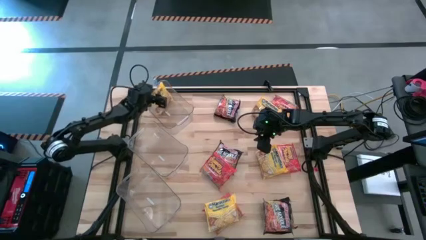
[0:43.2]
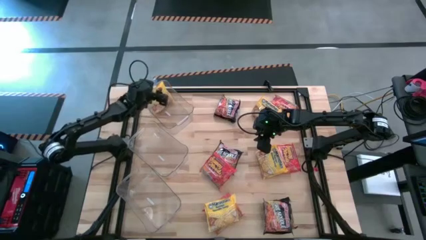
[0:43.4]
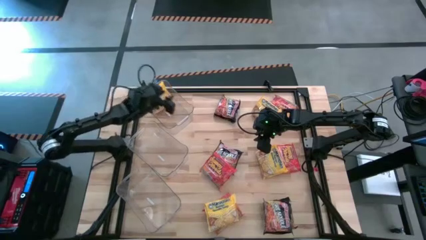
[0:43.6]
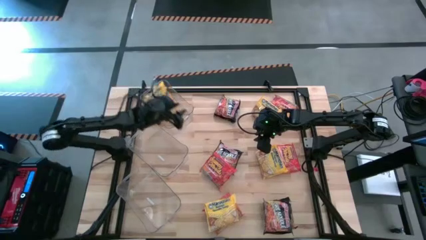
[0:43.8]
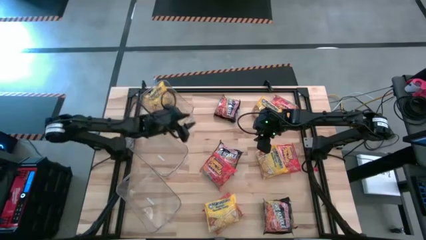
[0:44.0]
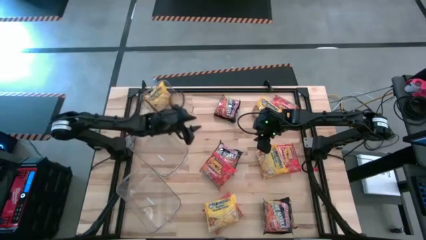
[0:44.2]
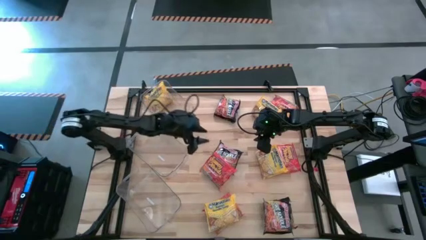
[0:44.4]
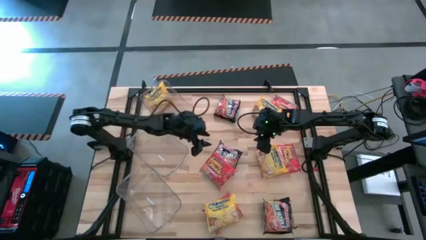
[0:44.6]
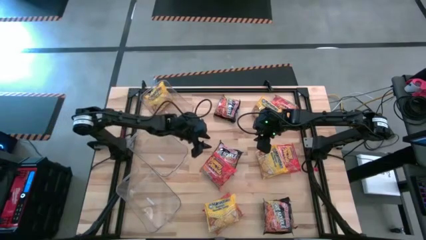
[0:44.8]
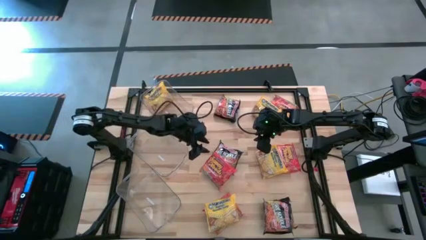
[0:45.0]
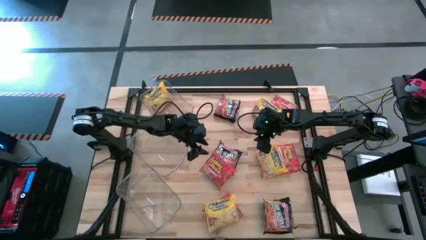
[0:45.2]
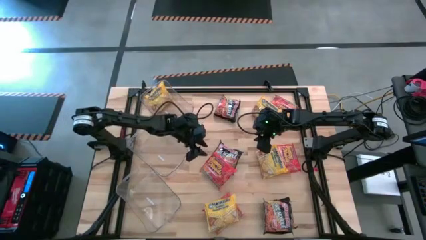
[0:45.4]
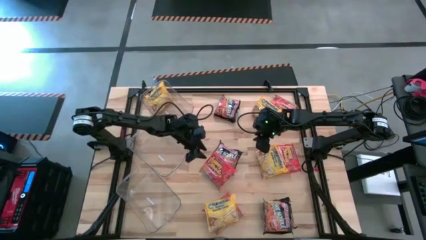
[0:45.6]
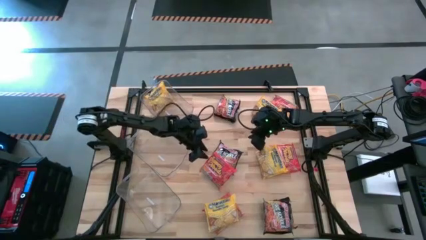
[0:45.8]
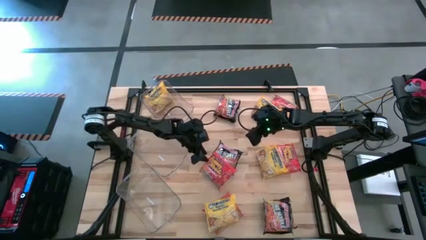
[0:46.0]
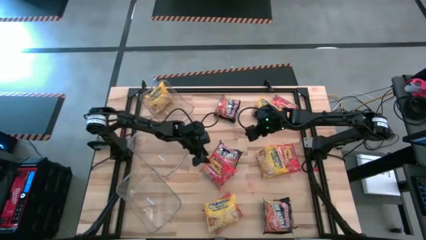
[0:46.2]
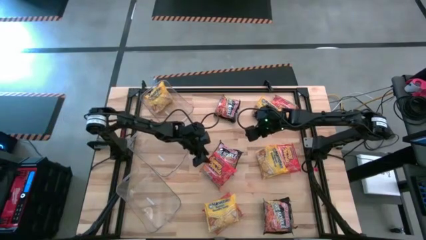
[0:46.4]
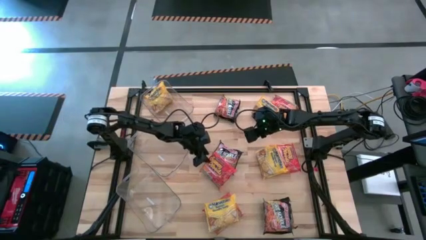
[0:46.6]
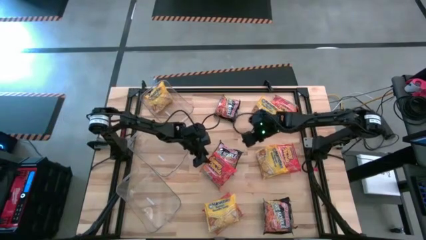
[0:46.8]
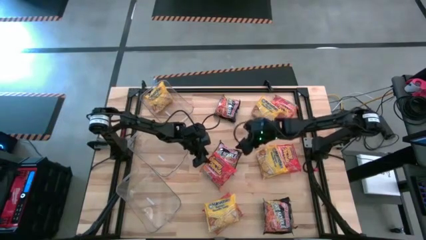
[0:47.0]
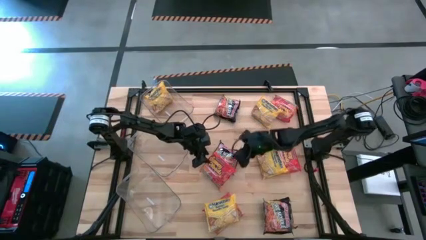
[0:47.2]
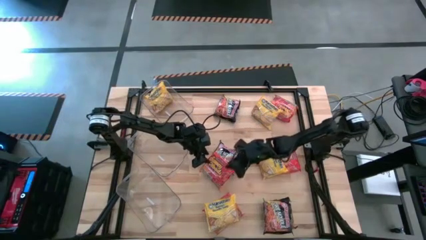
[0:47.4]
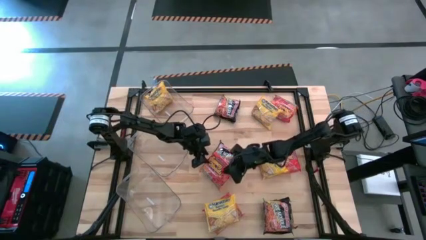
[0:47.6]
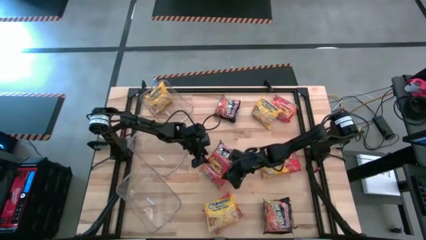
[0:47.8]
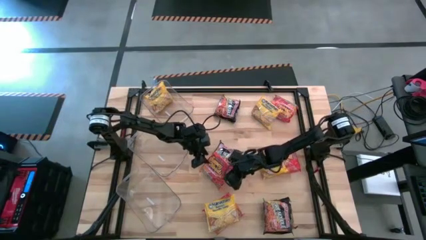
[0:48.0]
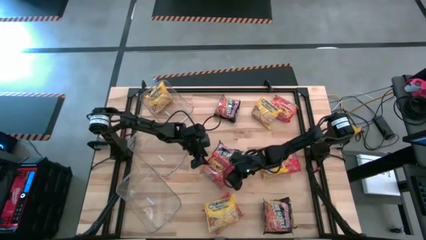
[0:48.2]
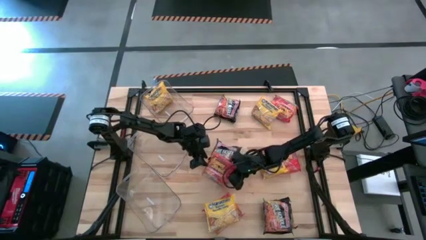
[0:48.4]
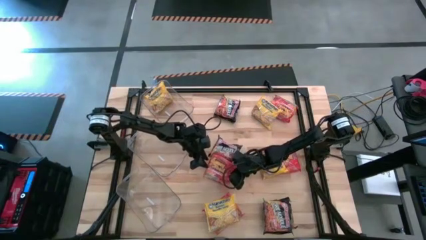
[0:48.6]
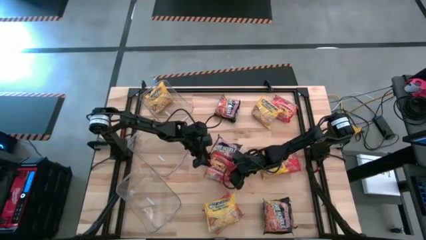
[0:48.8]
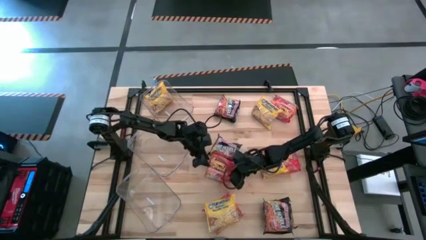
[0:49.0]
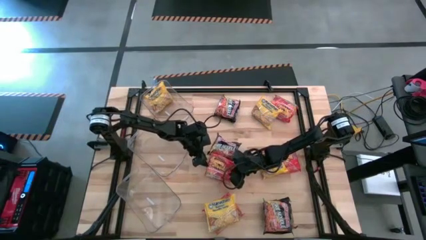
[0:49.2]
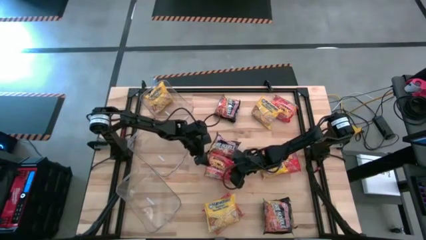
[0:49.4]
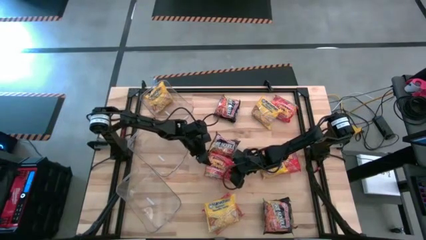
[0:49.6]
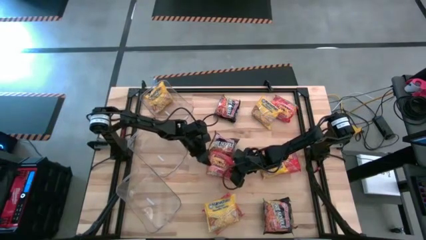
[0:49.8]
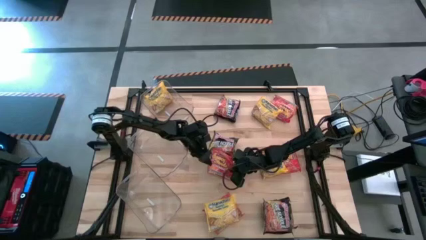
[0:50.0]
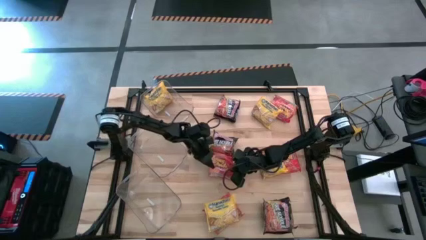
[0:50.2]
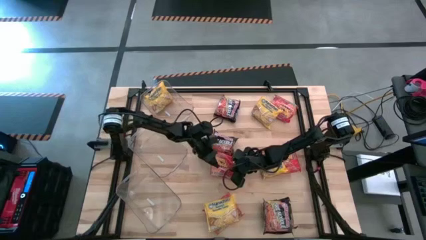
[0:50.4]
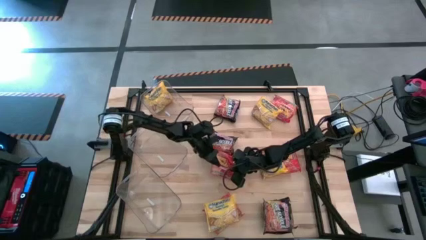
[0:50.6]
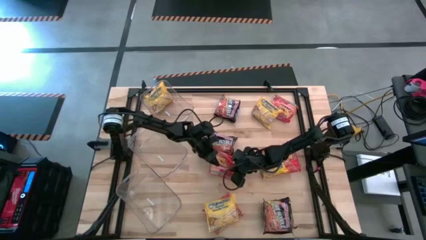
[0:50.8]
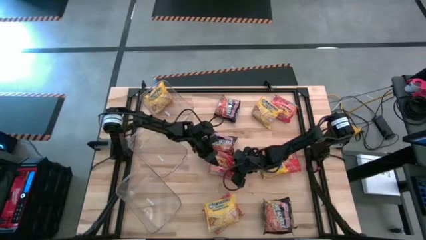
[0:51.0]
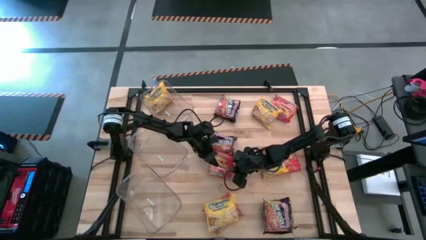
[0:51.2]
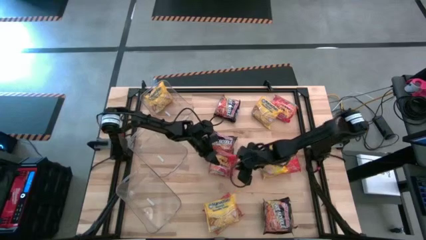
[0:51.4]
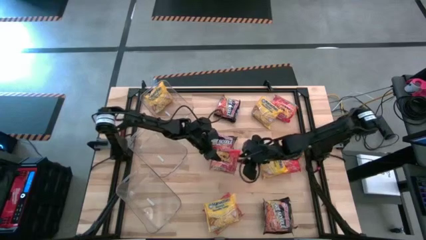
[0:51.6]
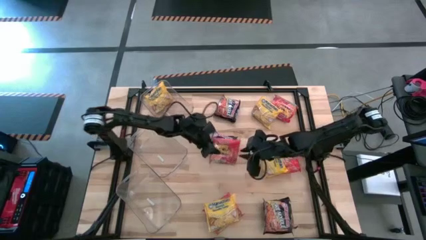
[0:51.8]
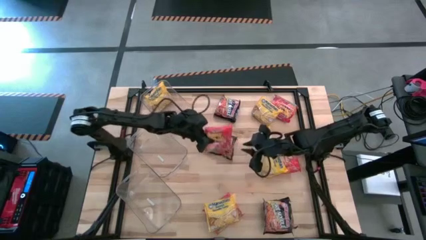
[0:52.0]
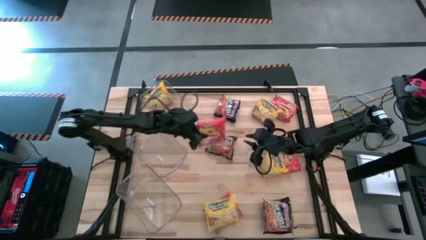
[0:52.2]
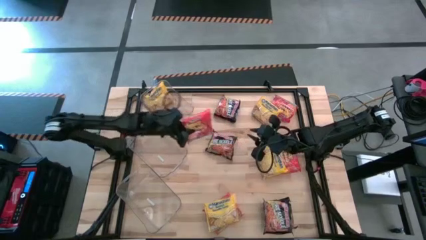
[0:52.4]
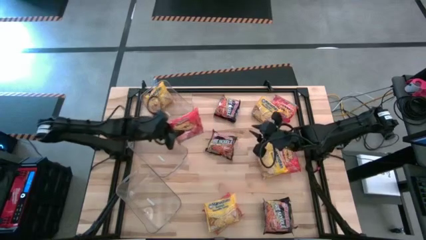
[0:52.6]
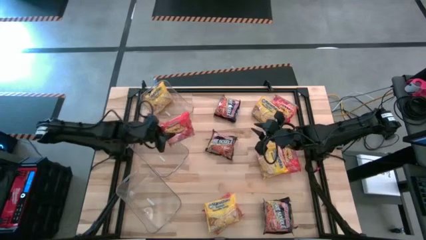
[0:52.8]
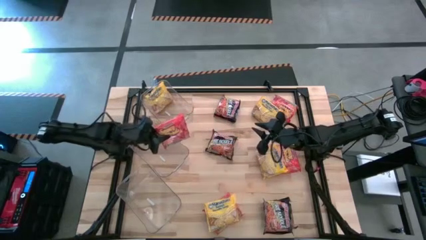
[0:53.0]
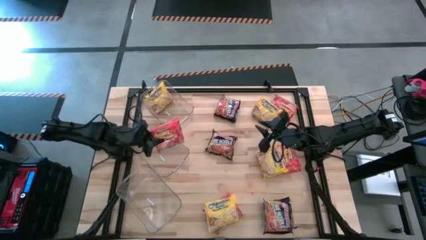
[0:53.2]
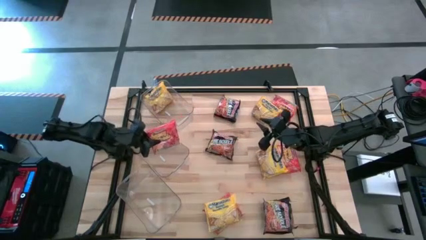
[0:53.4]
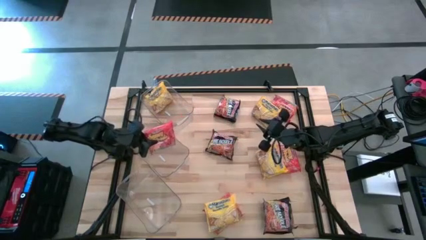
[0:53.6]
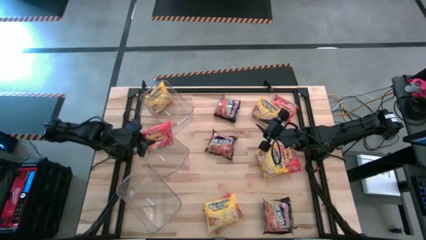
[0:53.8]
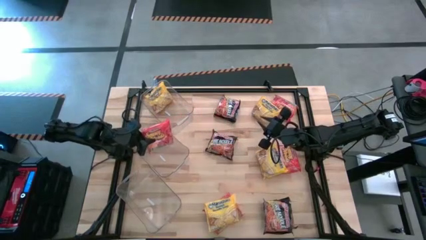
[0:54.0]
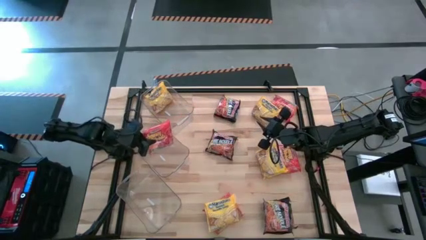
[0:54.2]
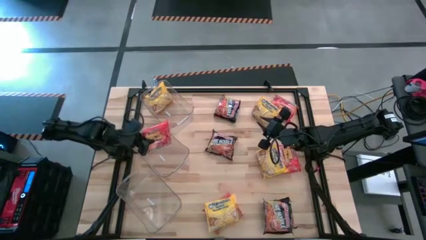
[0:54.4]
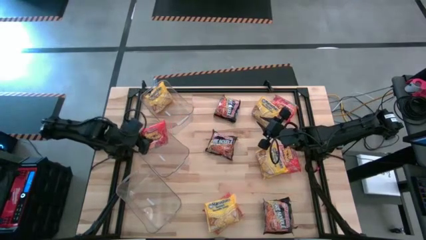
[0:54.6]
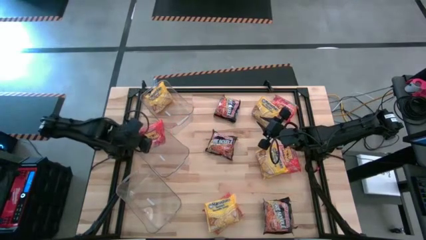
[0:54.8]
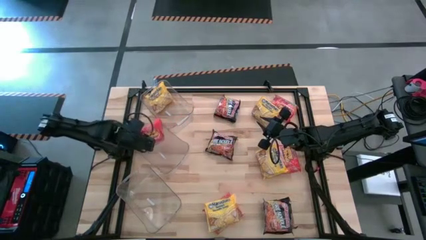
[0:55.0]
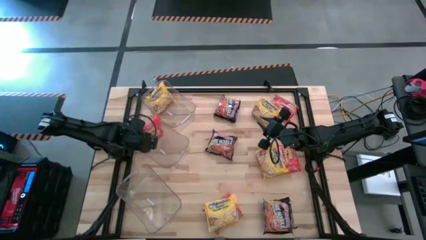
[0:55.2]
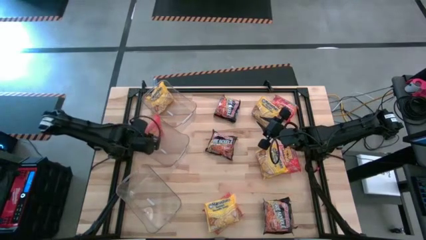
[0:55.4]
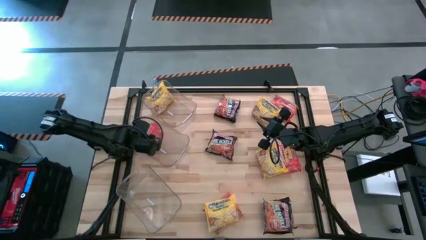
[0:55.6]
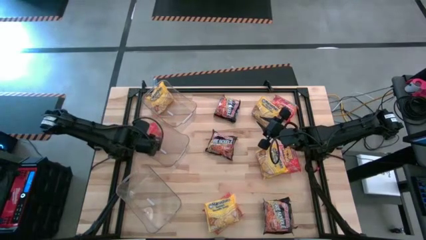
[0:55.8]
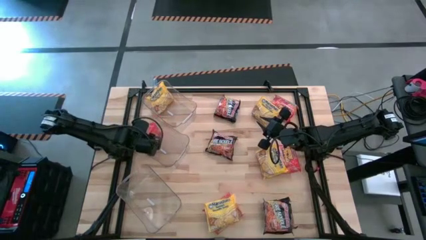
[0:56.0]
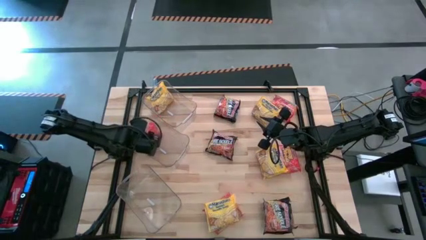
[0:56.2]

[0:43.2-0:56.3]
Task: Sort Maruchan noodles
Put the noodles pack into the middle transparent bin
